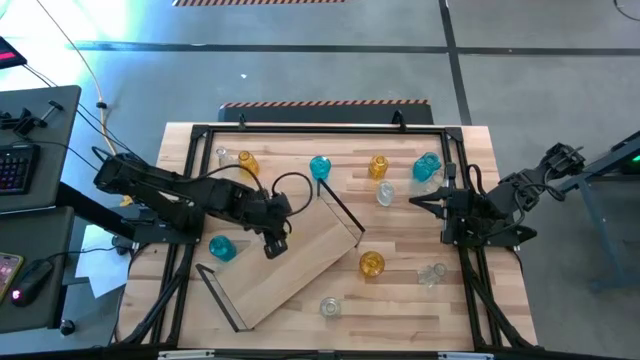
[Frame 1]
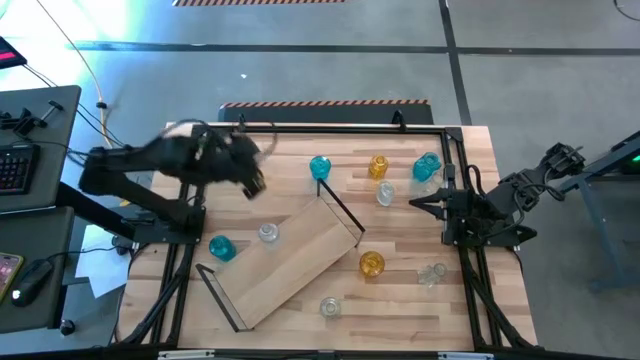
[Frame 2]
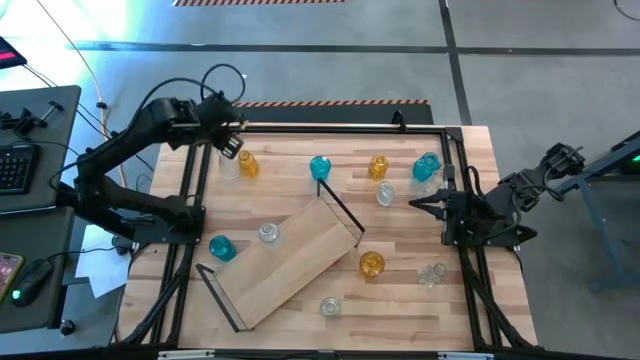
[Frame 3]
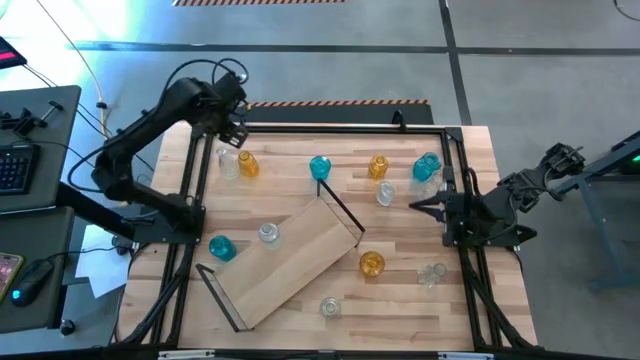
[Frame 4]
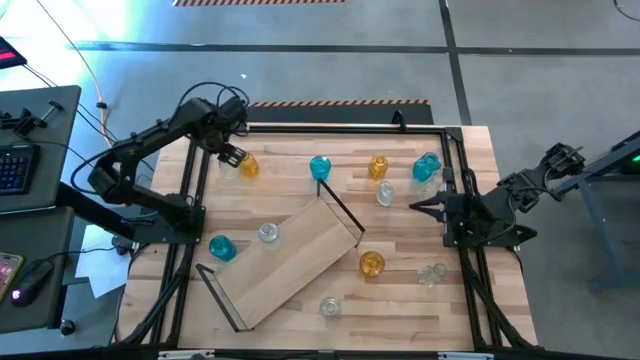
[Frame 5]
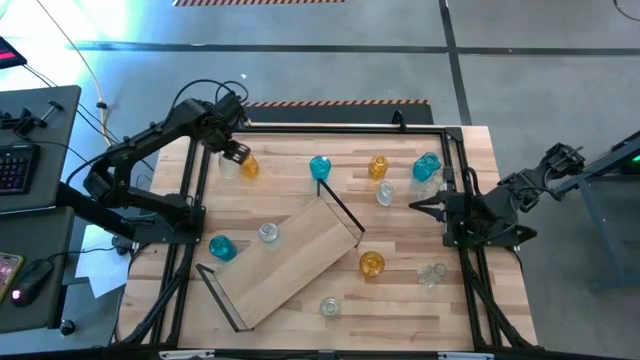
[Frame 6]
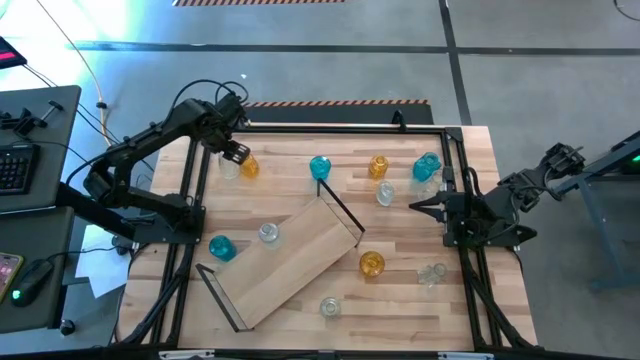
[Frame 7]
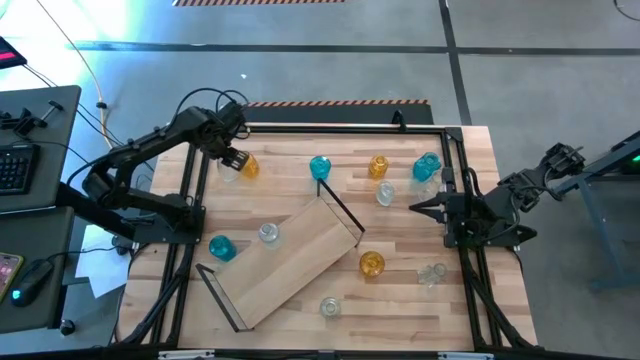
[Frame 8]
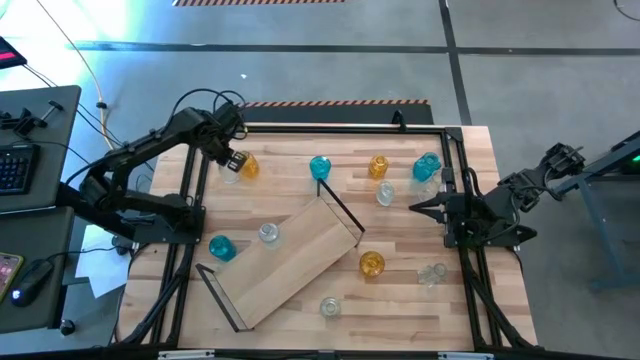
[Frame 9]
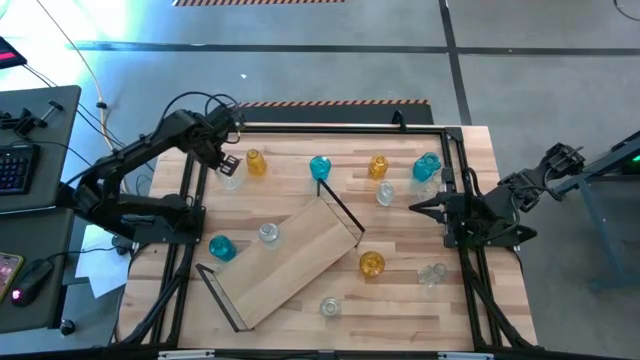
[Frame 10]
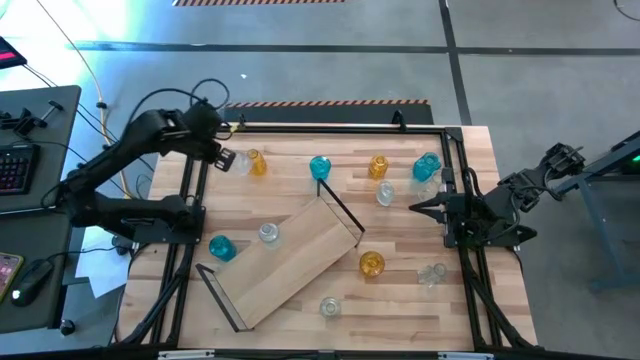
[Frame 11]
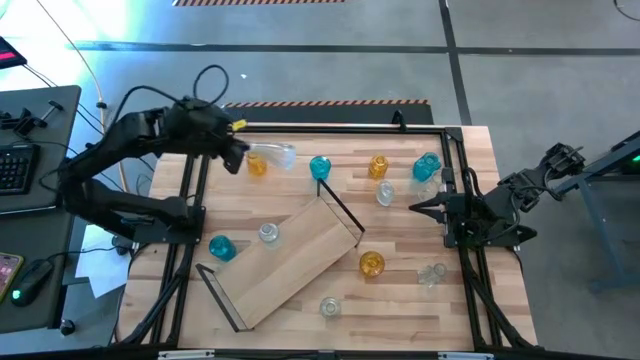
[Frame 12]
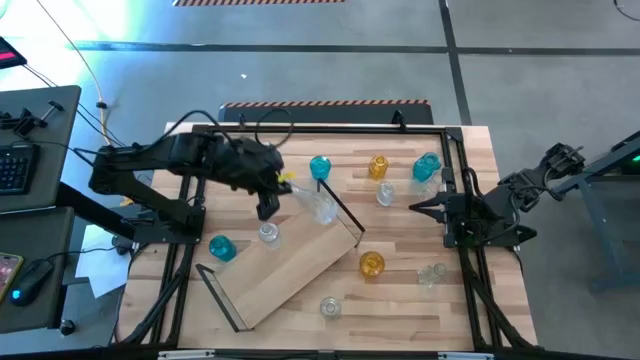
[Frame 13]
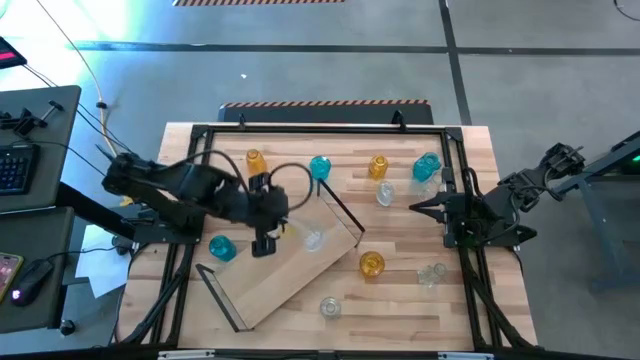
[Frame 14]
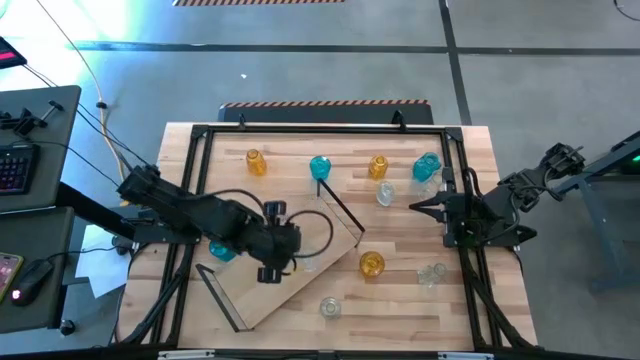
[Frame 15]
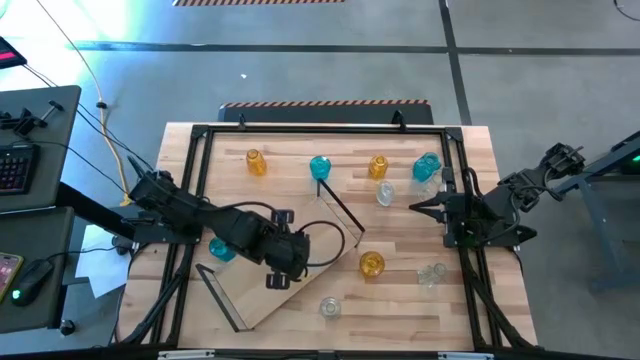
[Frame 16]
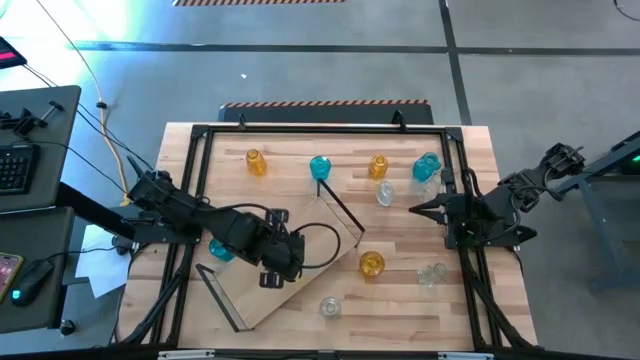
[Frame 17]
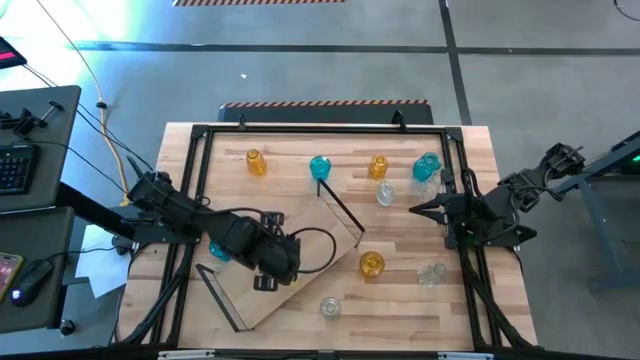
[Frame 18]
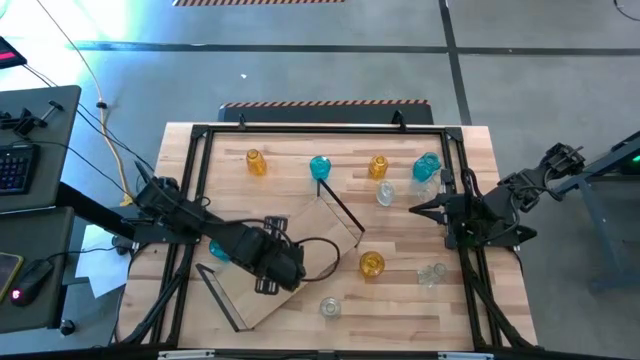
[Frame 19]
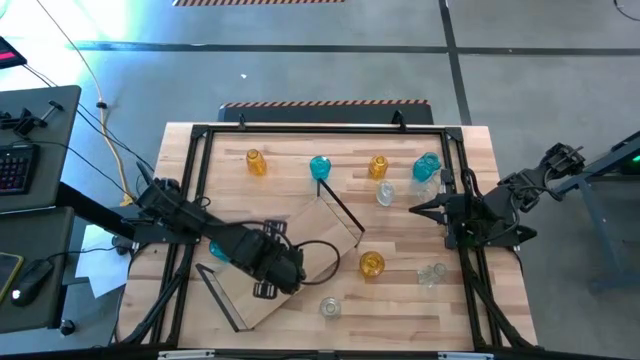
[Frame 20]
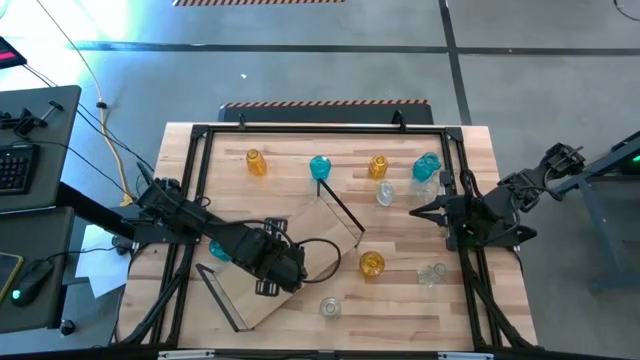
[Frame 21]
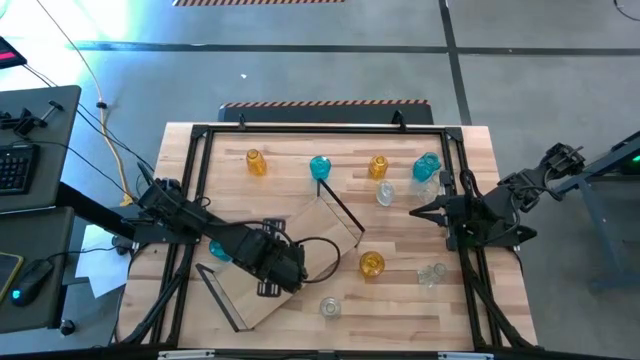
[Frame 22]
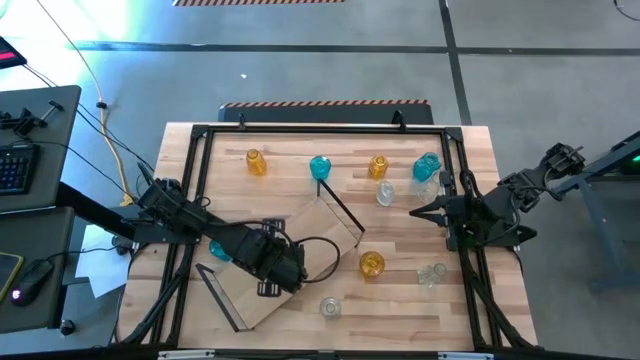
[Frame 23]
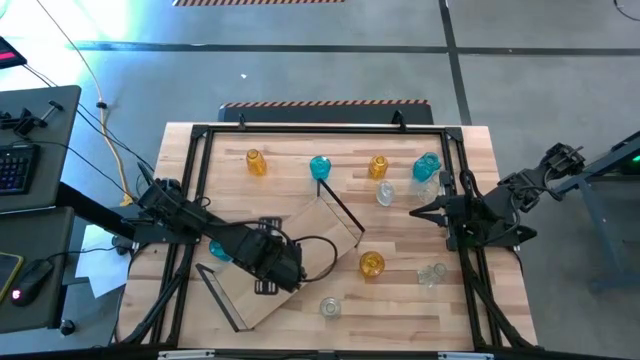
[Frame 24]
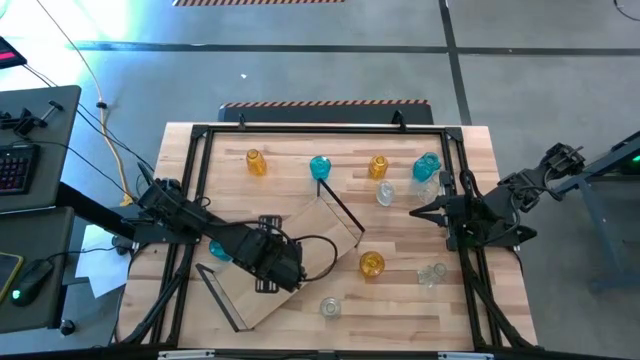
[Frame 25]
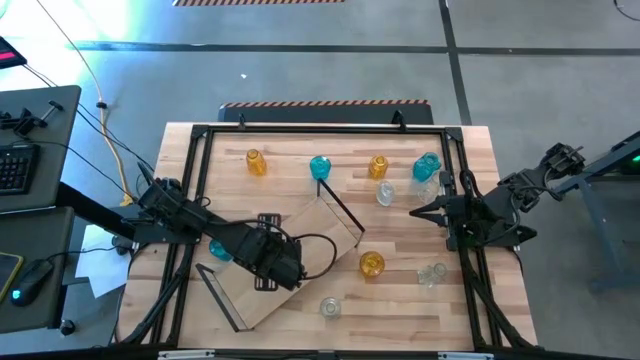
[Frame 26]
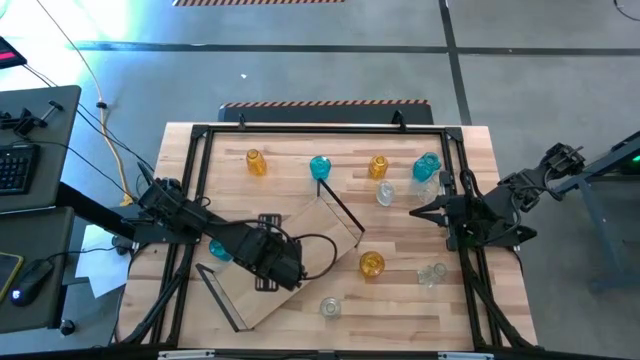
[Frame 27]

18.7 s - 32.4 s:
Task: sort vases onto shelf
Put the transparent vase on the shelf aligned with the other transparent vase

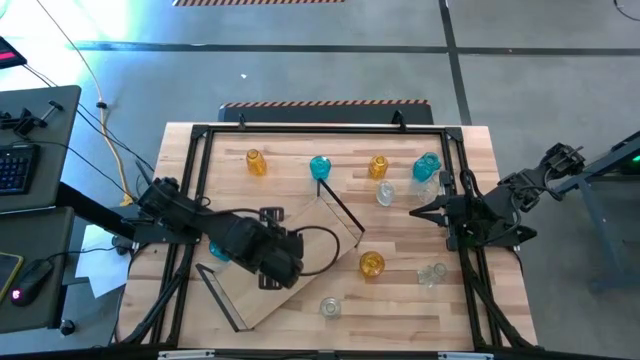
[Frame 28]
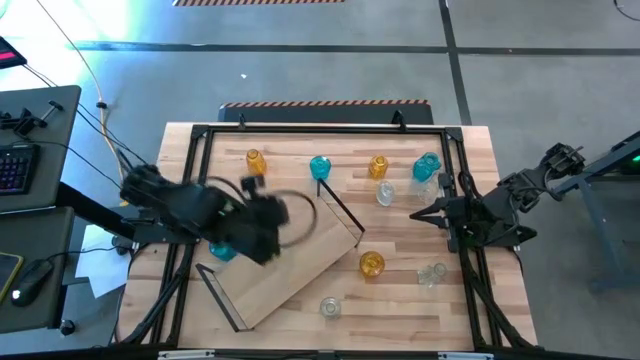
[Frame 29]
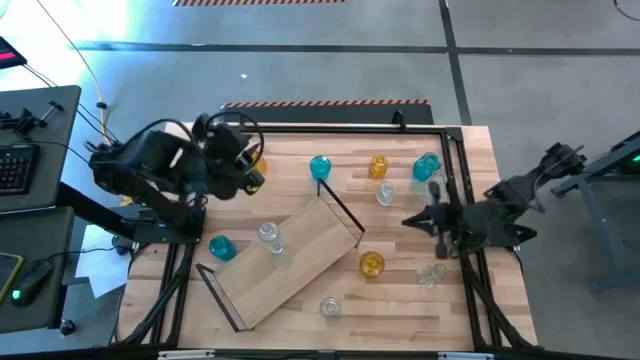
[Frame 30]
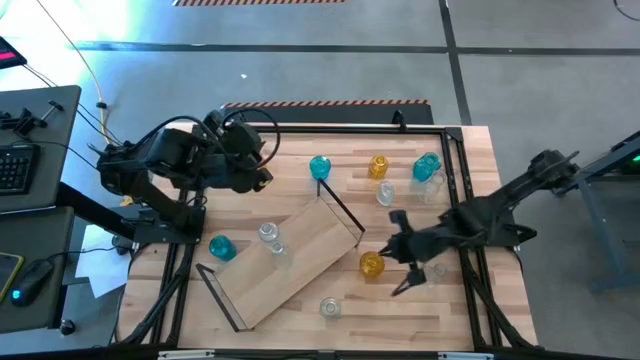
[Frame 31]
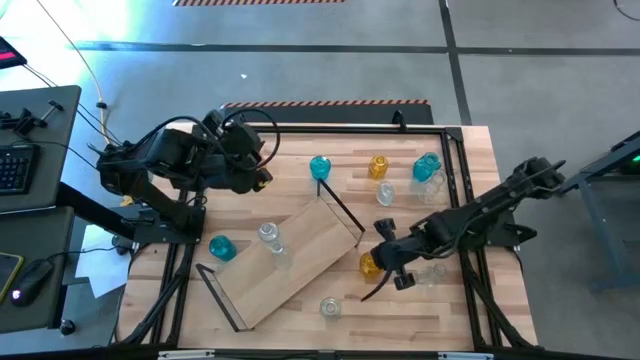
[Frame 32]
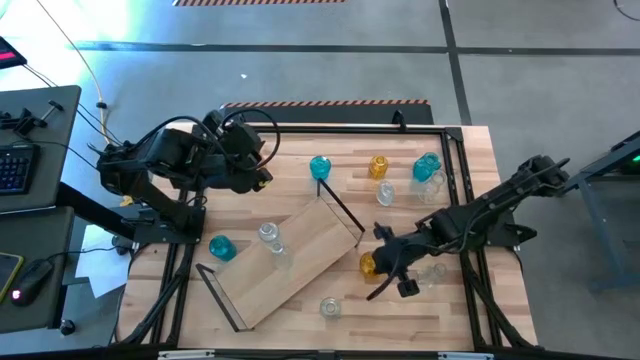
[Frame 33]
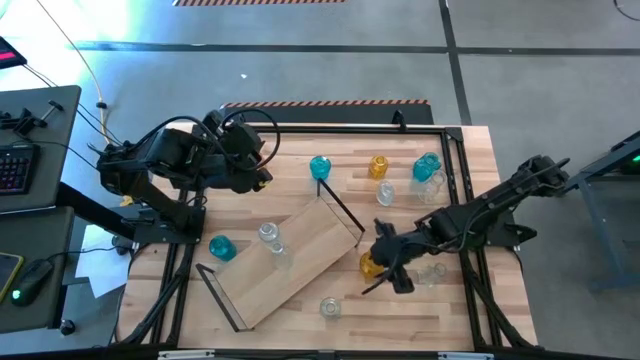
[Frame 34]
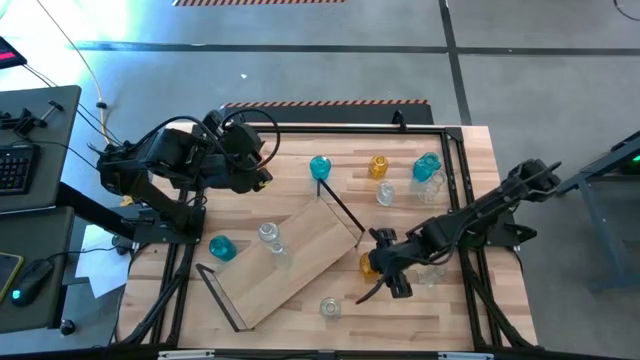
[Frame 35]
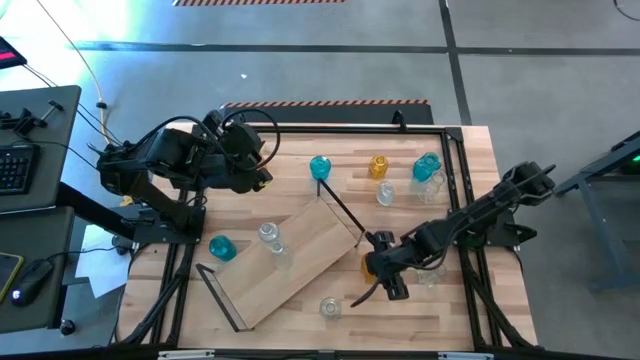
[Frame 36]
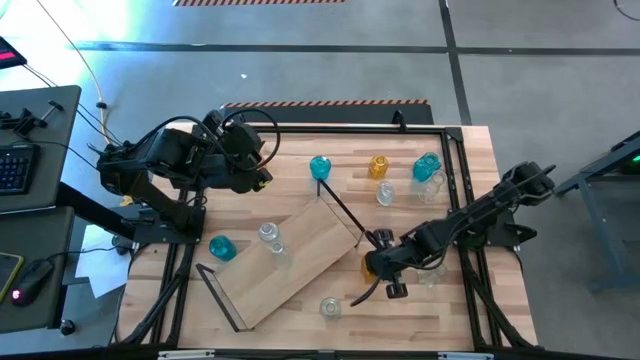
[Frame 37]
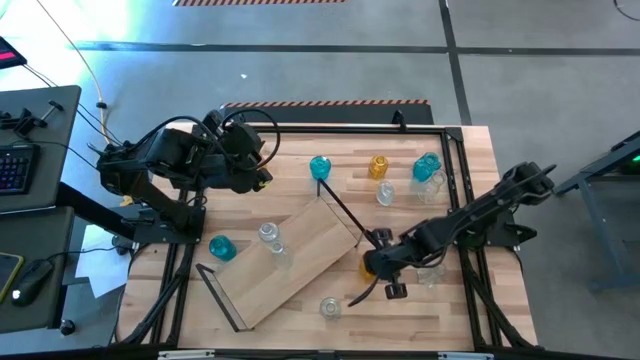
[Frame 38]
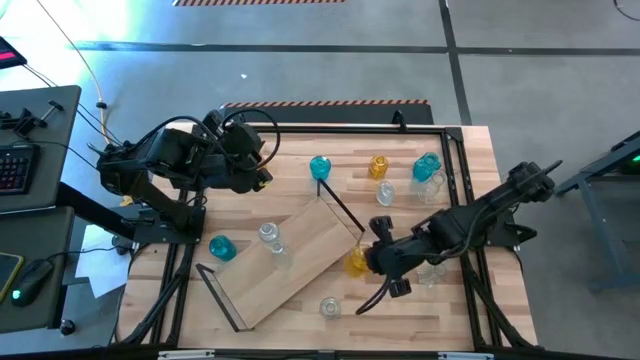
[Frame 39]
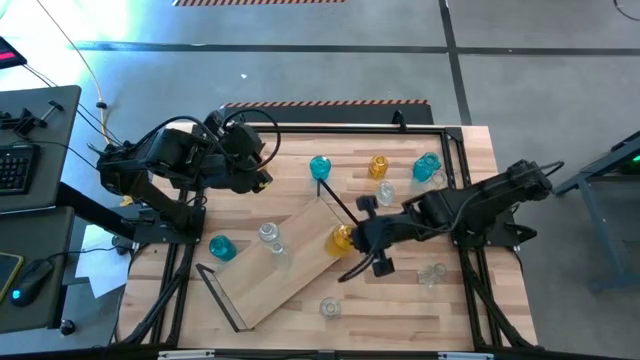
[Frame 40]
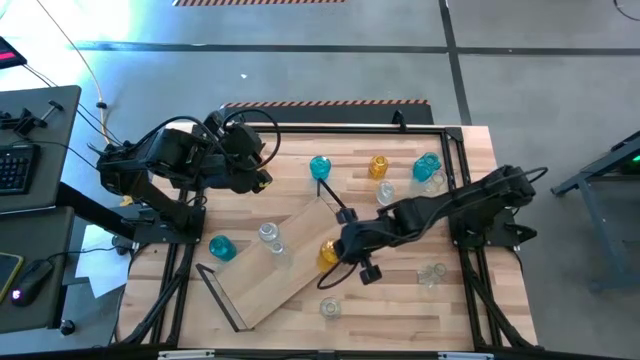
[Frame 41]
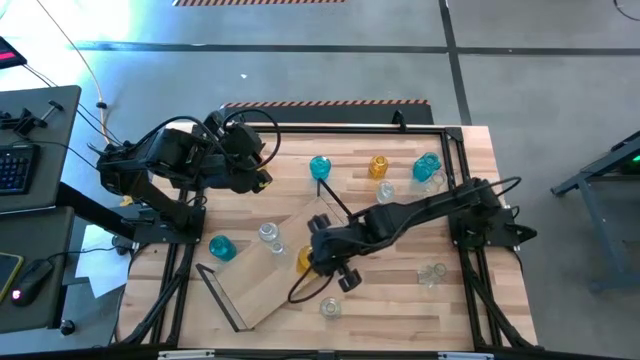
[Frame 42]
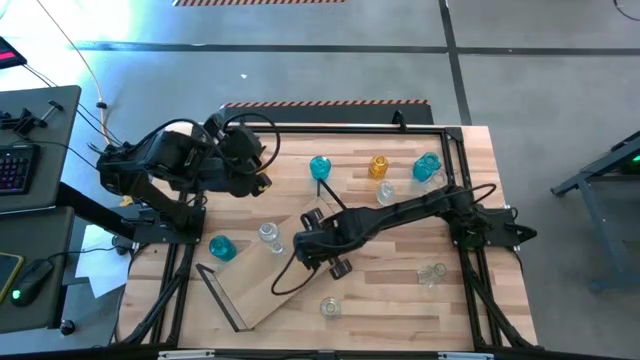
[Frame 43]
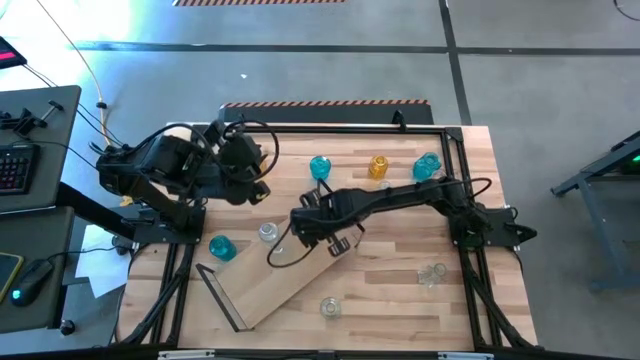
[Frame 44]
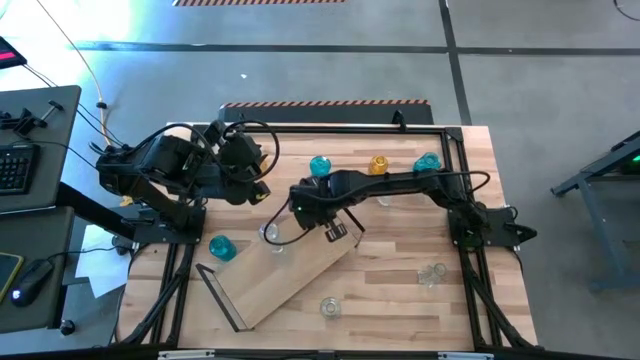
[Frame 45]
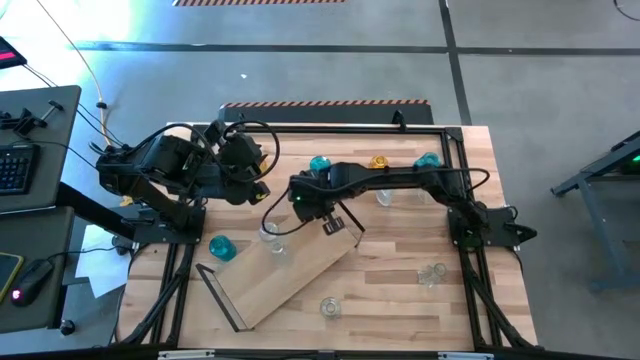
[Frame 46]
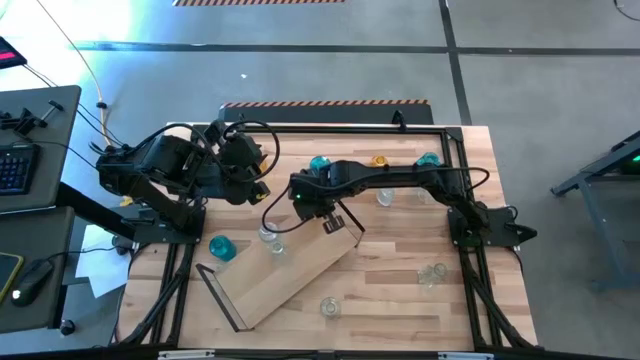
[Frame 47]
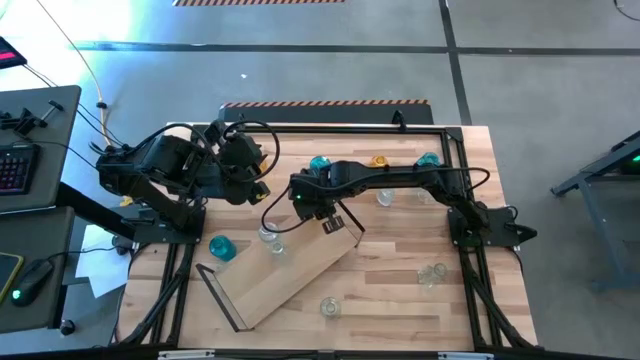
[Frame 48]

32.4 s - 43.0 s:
Put the yellow vase on the shelf
